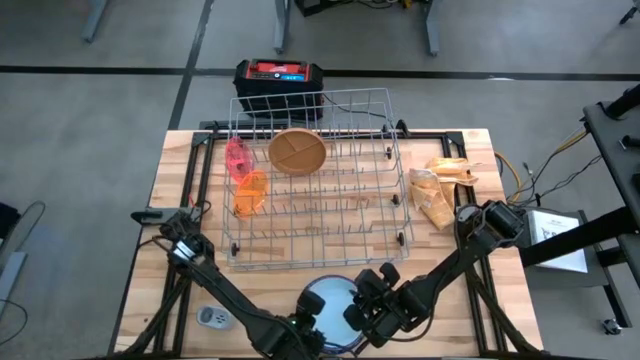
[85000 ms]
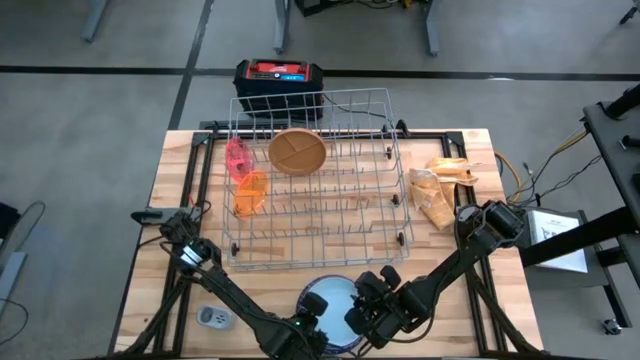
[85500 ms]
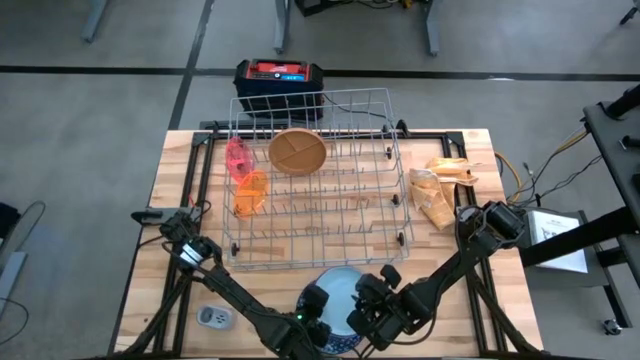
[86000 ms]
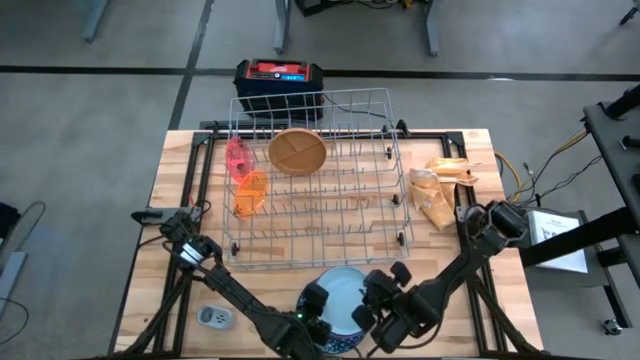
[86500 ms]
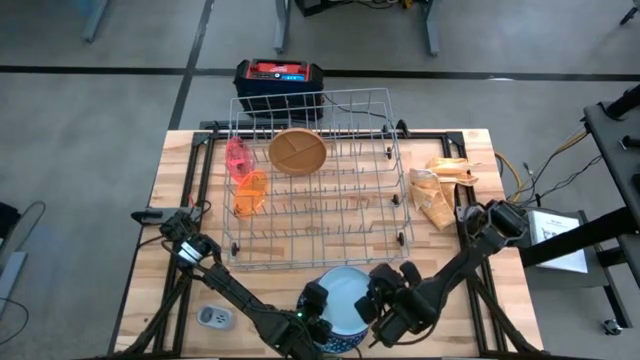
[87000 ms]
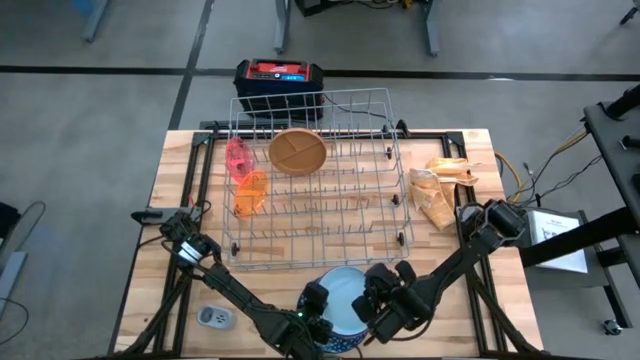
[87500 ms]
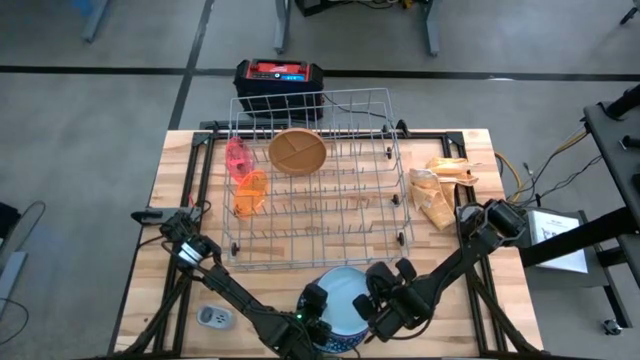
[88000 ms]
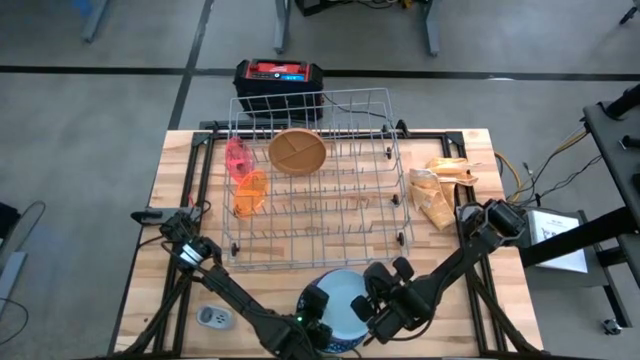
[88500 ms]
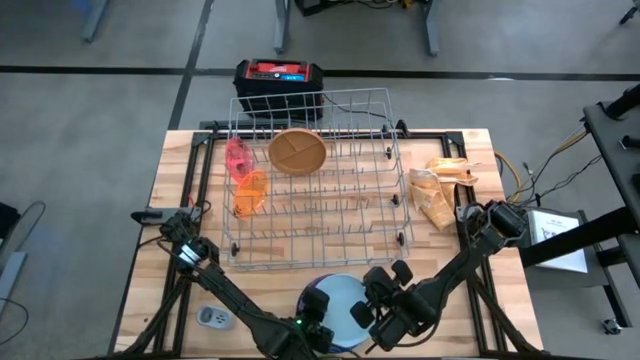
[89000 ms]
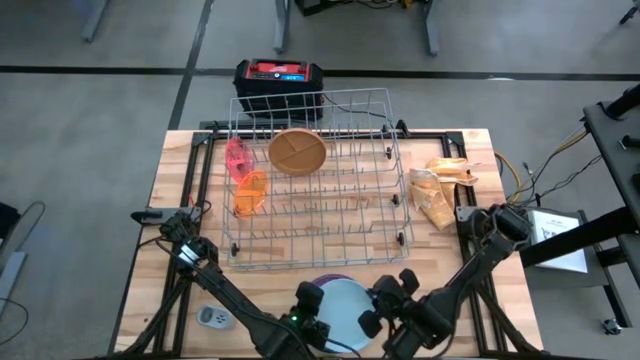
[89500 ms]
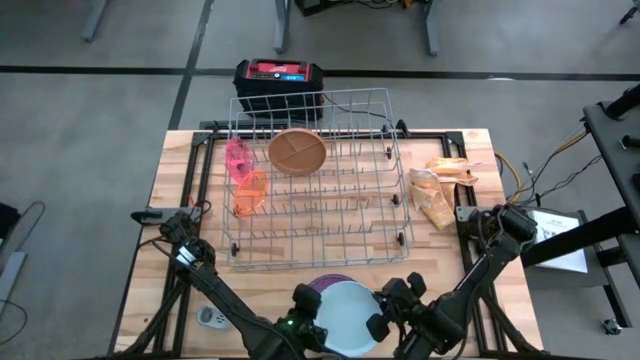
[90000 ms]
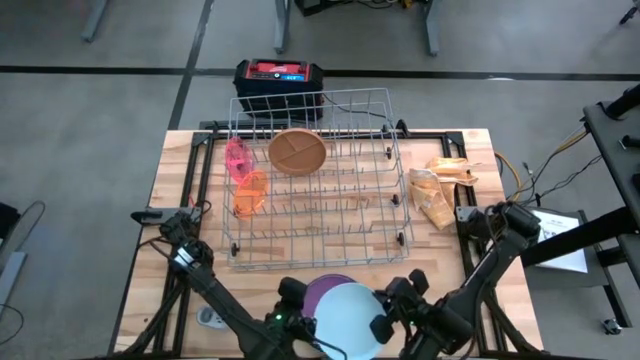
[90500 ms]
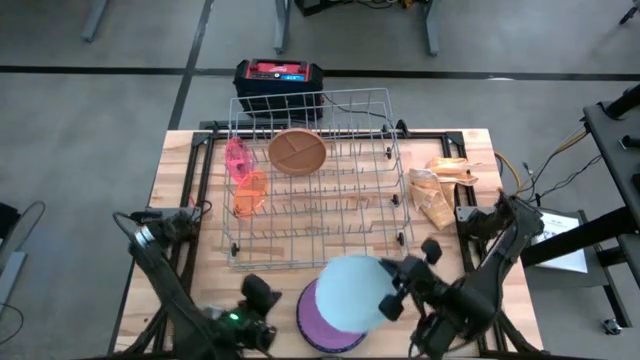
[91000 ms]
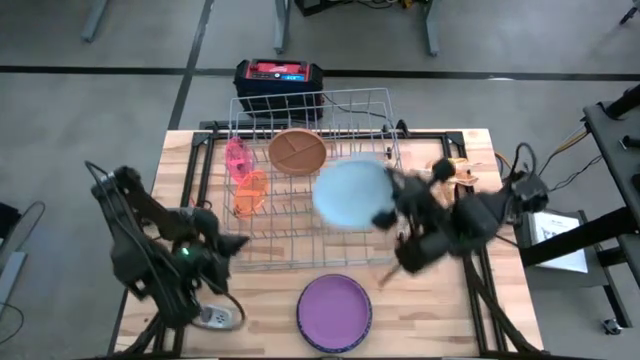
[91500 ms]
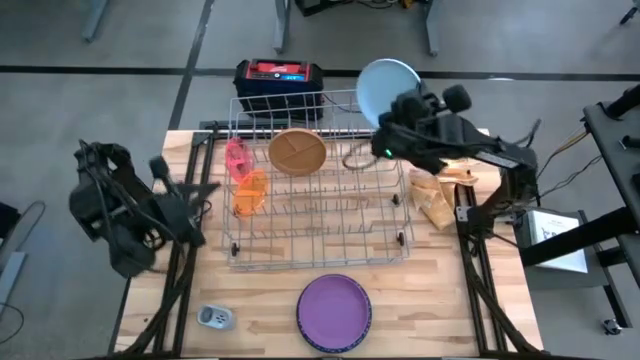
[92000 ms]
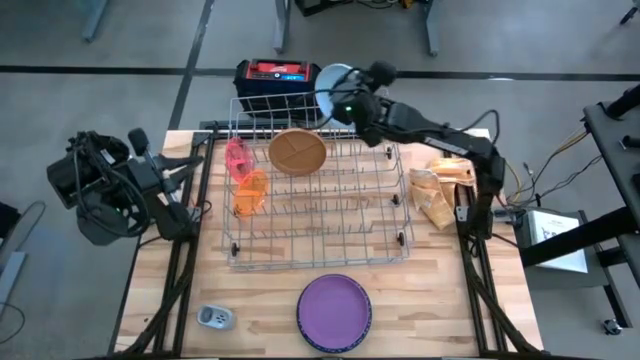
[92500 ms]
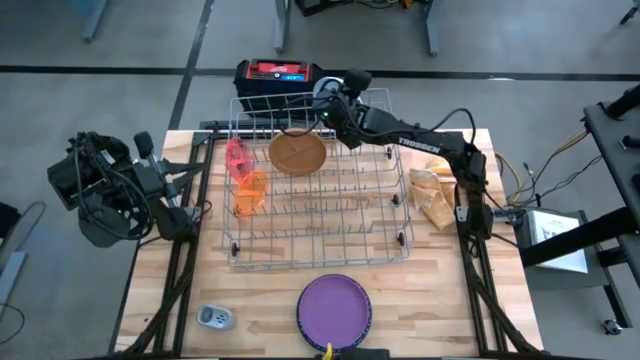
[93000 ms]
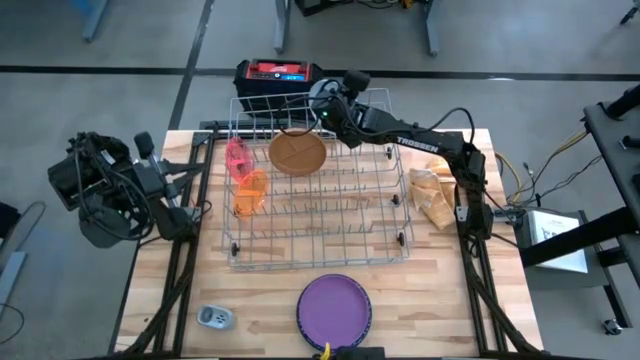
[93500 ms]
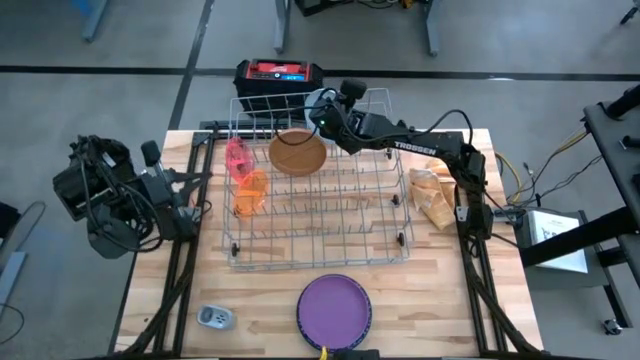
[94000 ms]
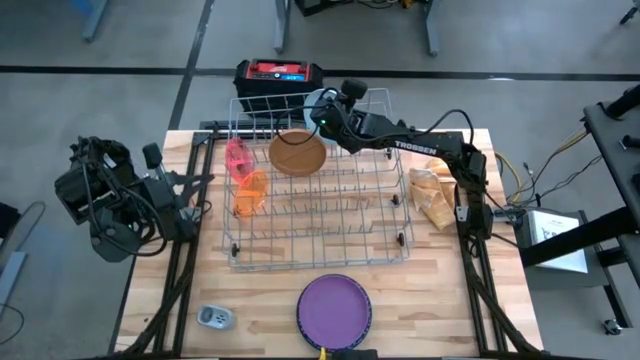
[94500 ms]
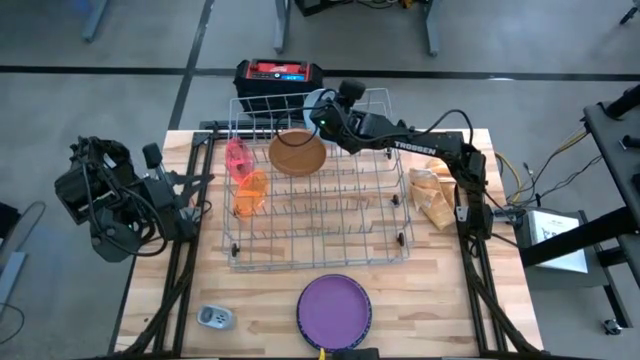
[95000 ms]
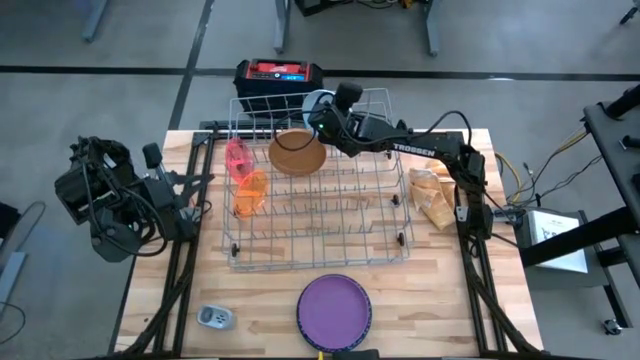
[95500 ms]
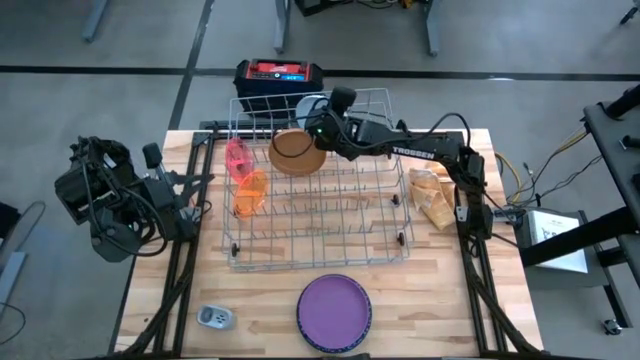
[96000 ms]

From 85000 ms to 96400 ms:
Task: Sort dishes
Put the gray plate into the dish rack

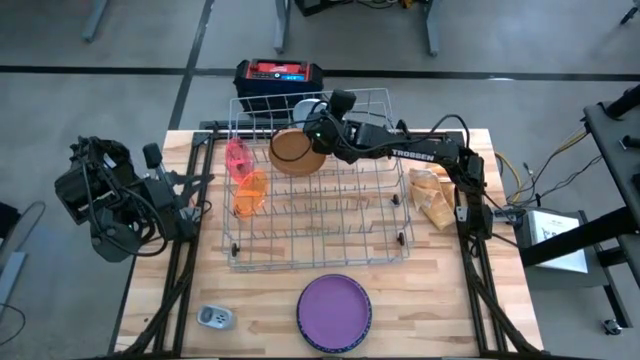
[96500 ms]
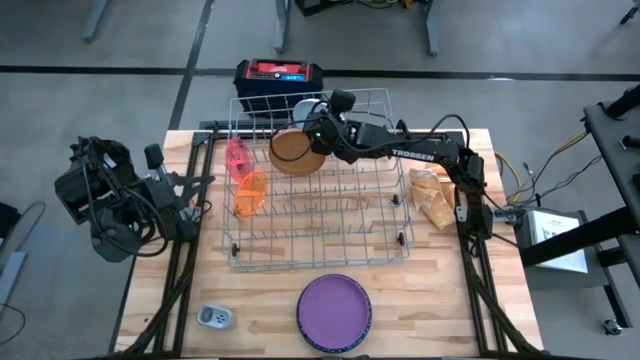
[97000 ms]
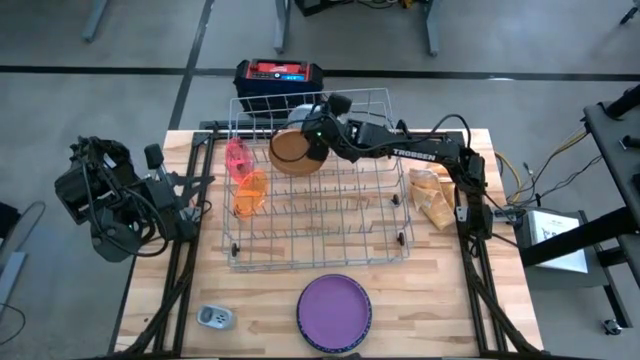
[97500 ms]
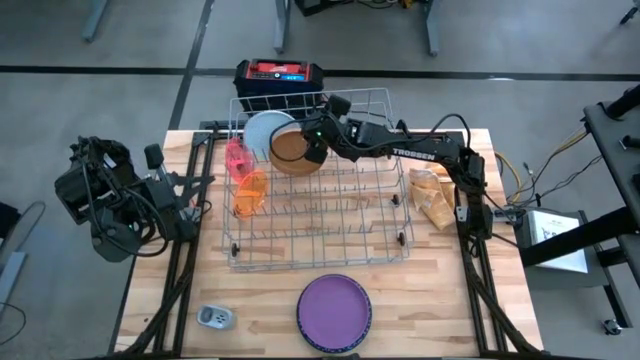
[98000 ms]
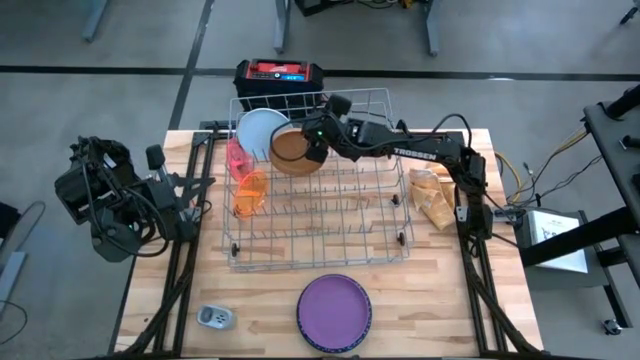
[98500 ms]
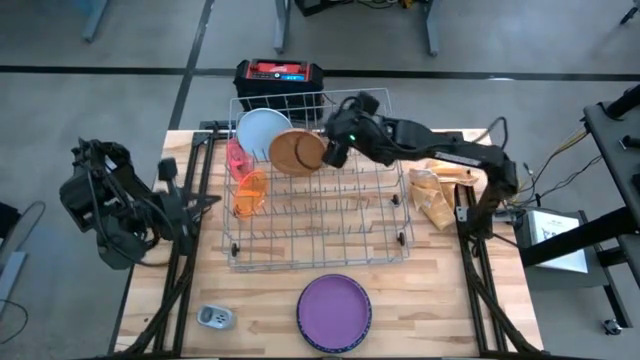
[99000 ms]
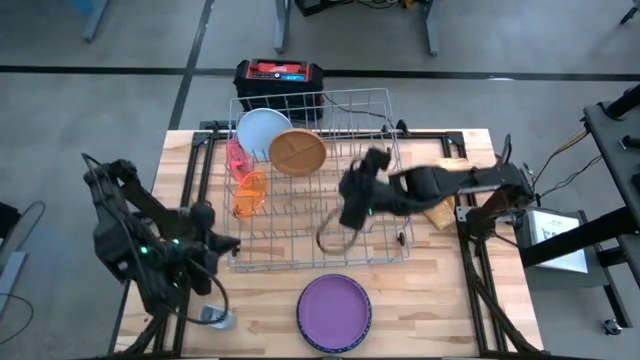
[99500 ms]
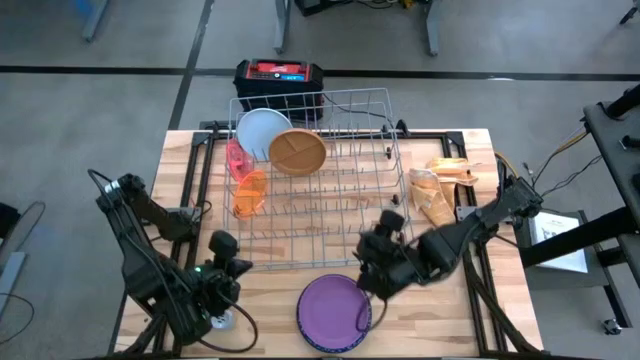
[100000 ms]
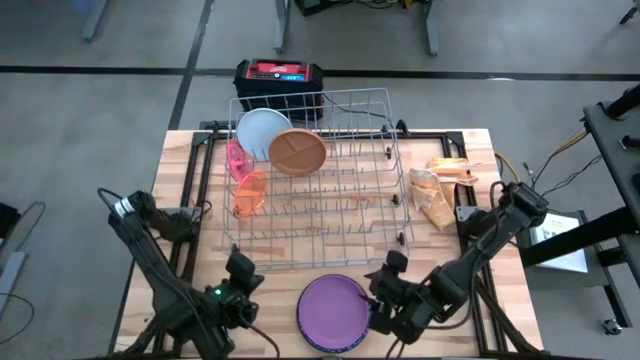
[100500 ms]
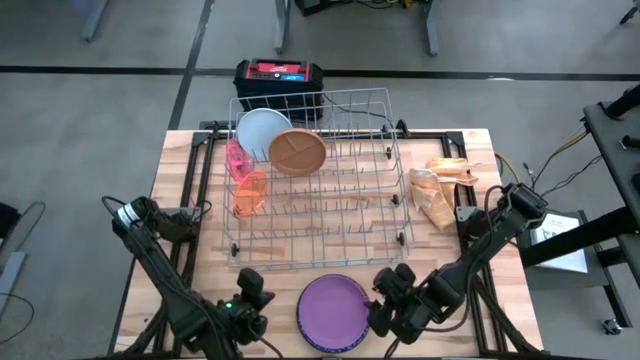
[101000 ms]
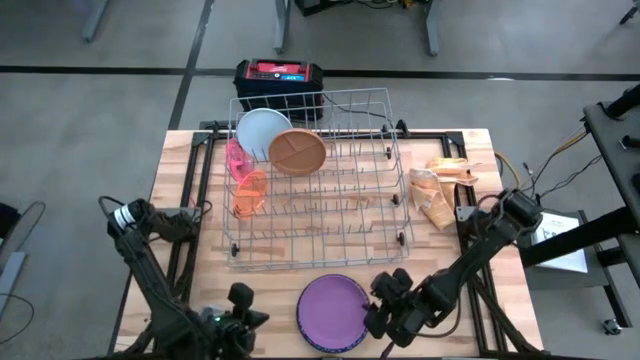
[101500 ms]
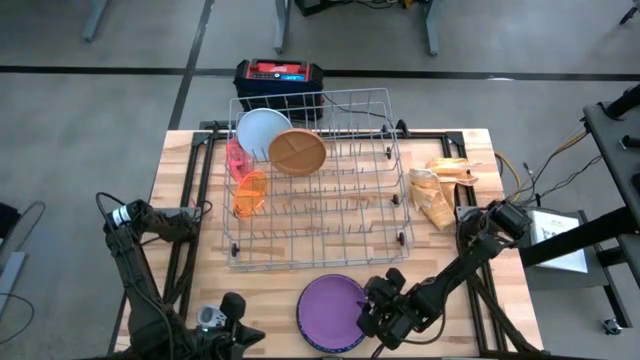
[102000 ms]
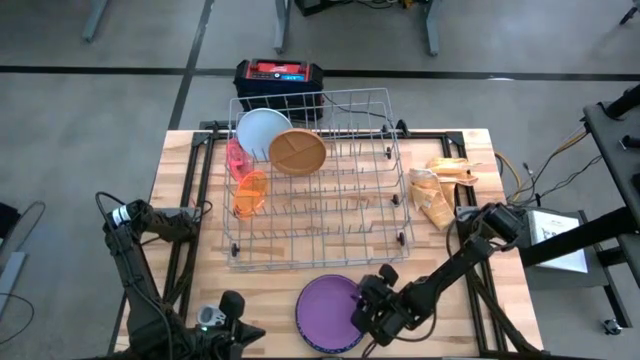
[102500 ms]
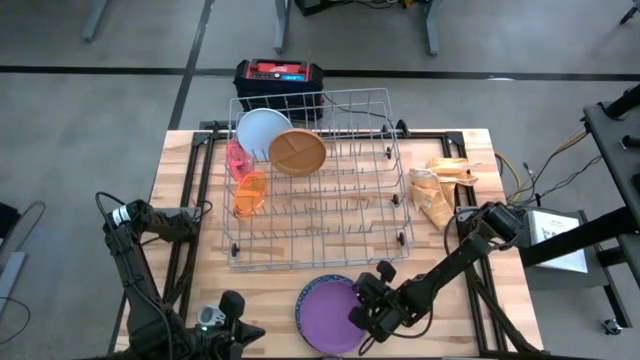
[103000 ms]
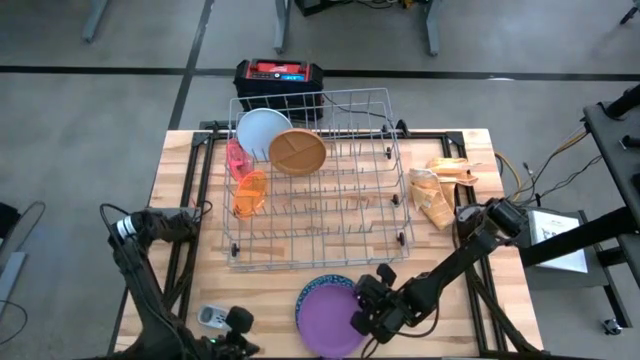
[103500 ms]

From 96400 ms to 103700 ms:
Put the violet plate into the dish rack

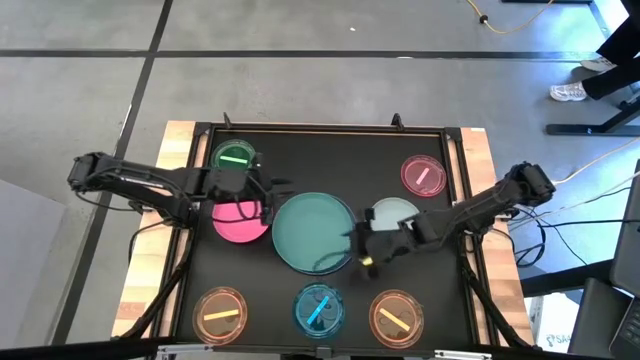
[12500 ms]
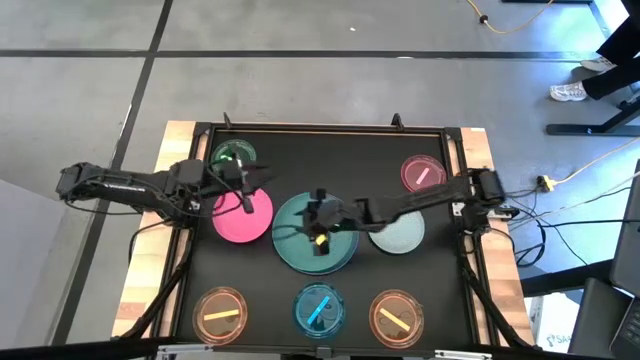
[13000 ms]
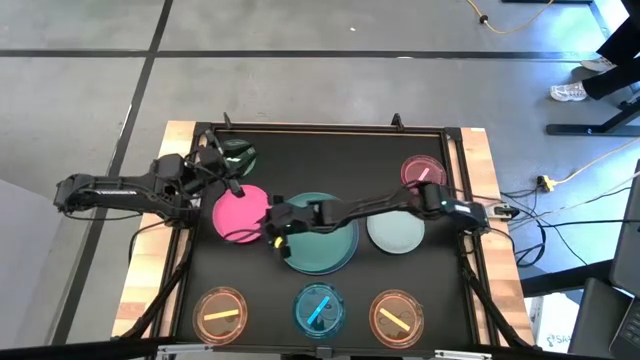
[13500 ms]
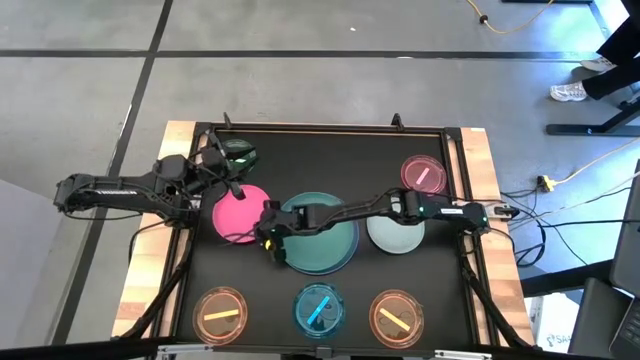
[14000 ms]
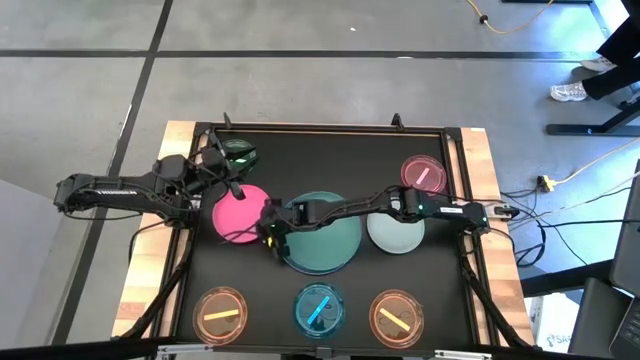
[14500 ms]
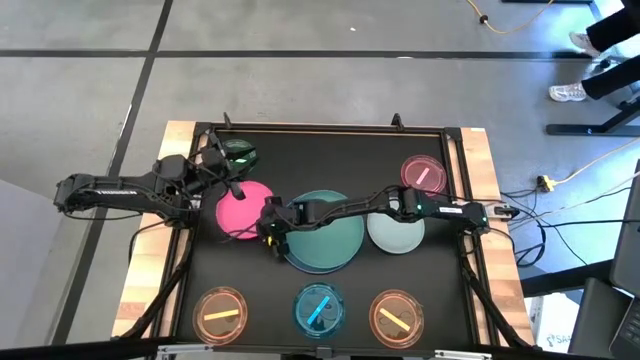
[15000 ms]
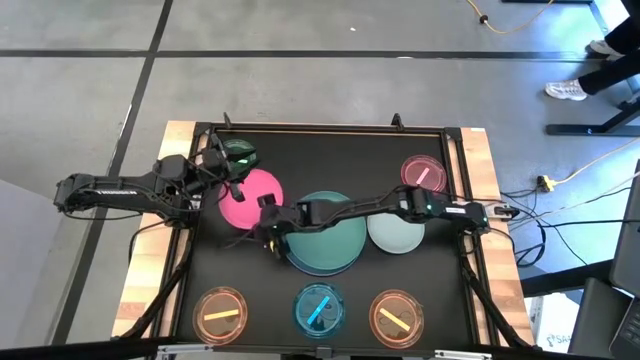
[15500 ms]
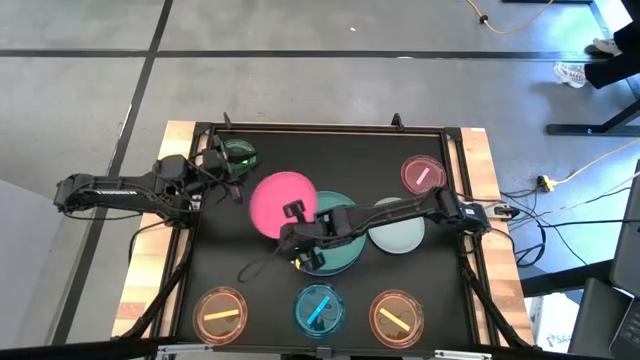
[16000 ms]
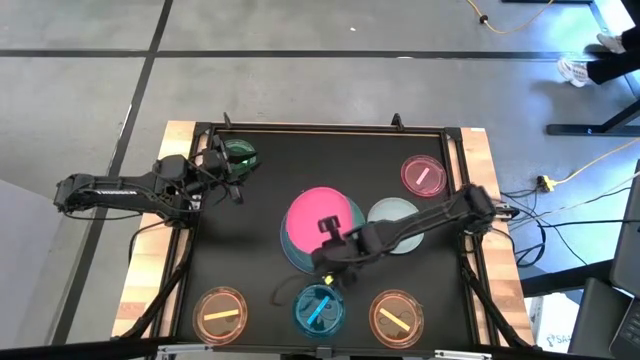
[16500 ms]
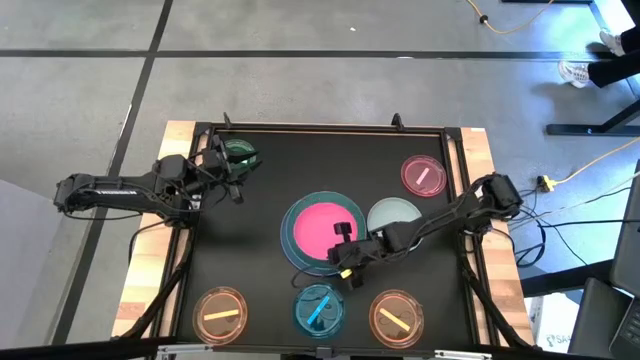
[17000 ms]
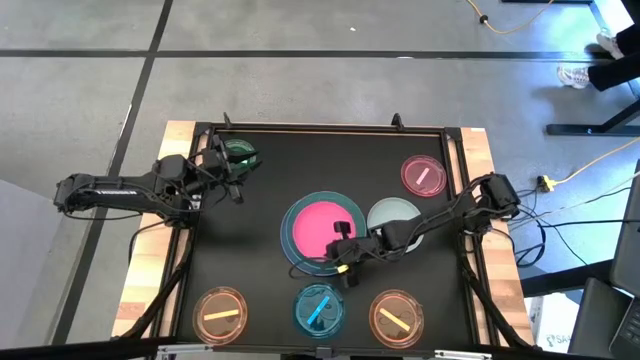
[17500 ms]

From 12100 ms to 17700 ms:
Task: Stack plastic plates
Stack the pink plate on top of the green plate
